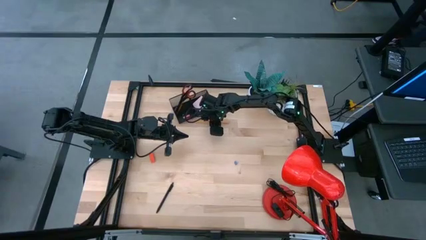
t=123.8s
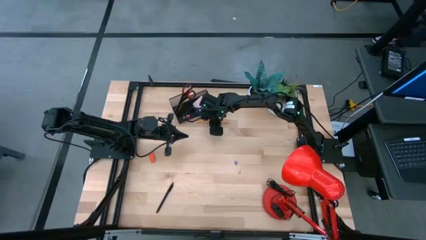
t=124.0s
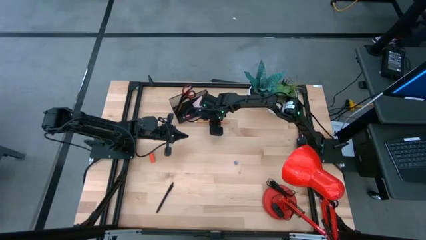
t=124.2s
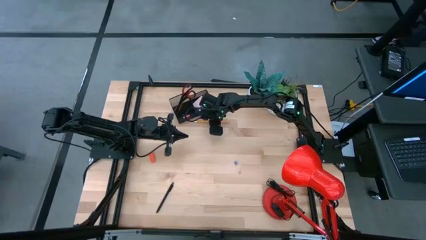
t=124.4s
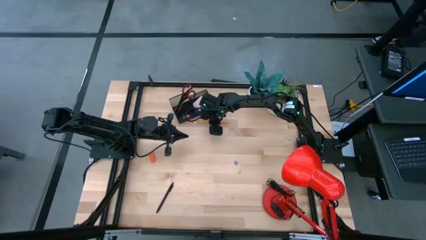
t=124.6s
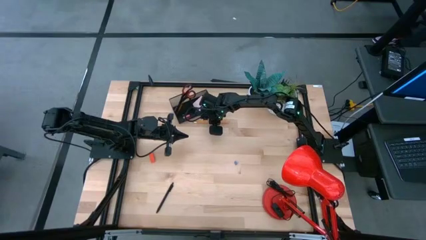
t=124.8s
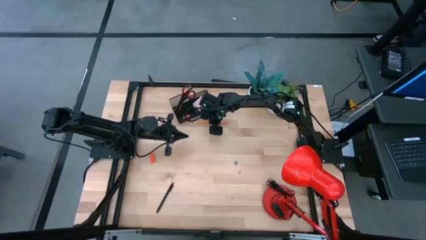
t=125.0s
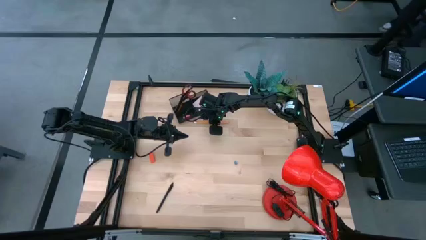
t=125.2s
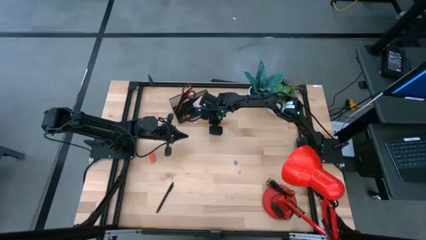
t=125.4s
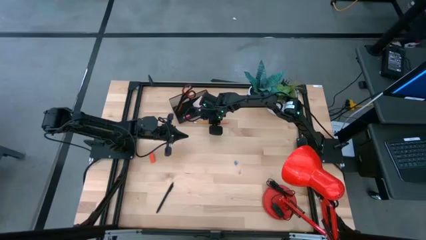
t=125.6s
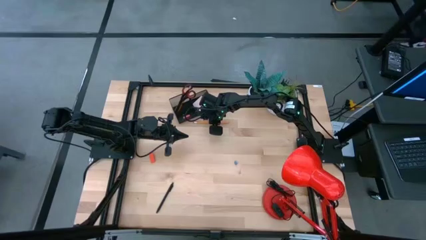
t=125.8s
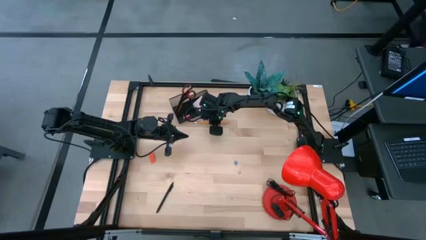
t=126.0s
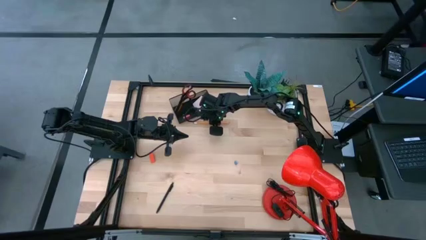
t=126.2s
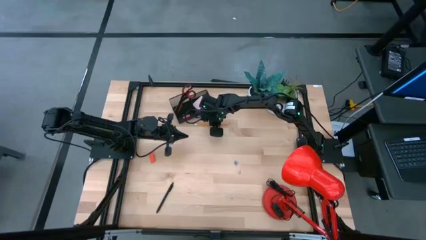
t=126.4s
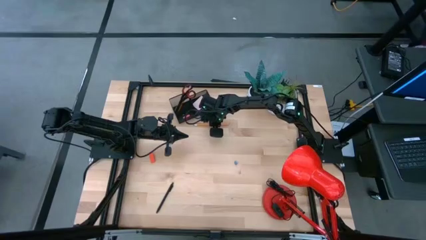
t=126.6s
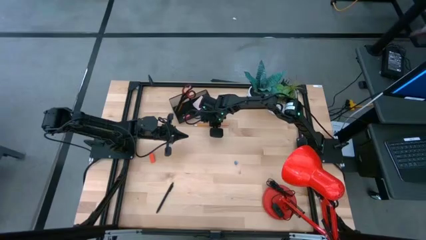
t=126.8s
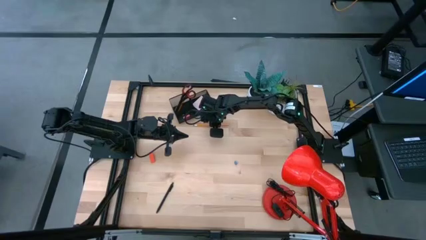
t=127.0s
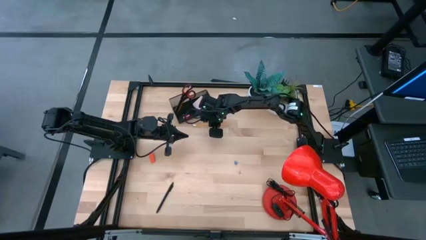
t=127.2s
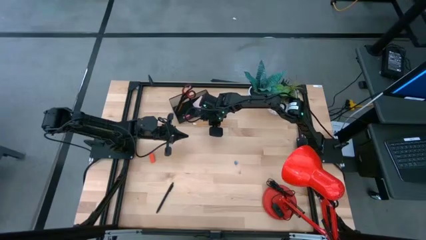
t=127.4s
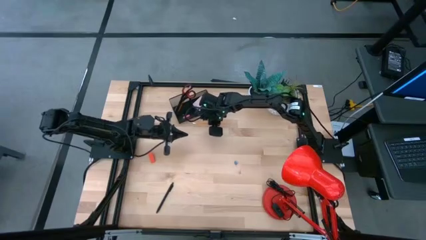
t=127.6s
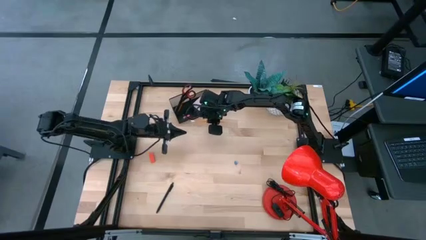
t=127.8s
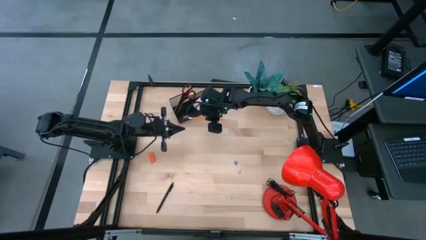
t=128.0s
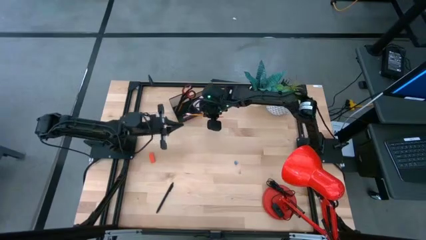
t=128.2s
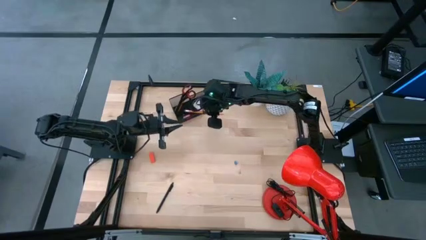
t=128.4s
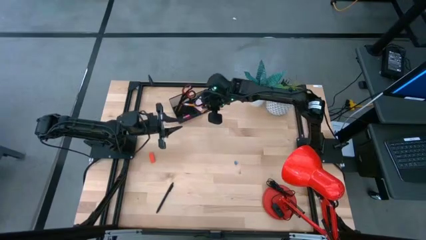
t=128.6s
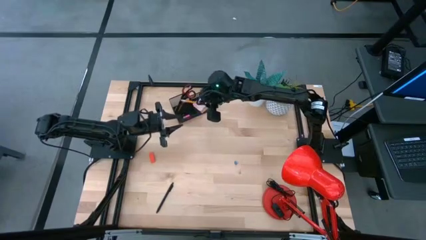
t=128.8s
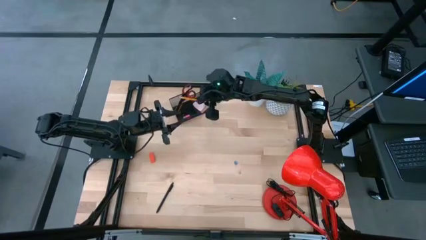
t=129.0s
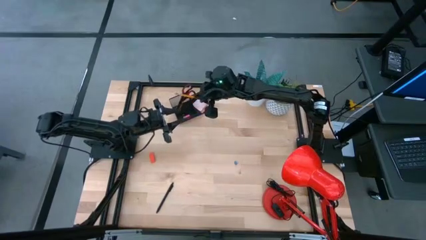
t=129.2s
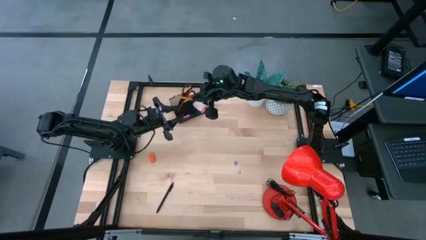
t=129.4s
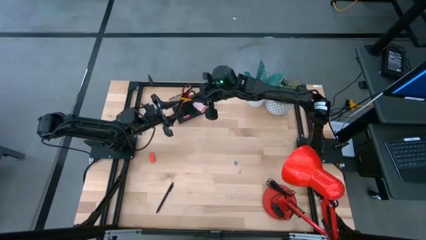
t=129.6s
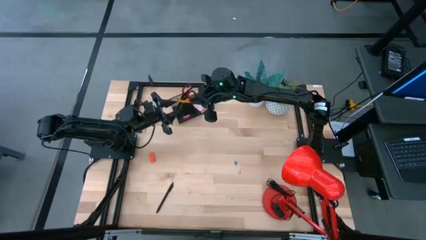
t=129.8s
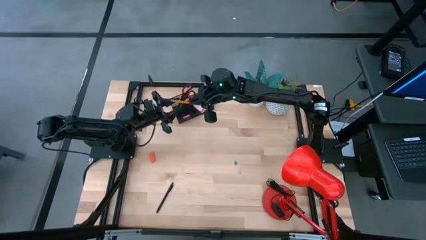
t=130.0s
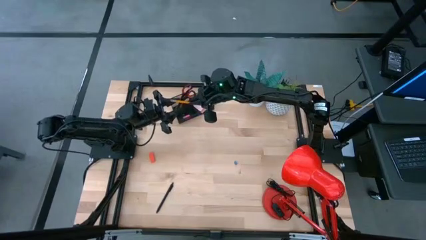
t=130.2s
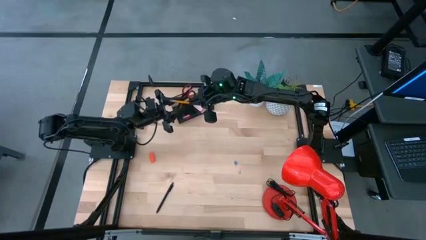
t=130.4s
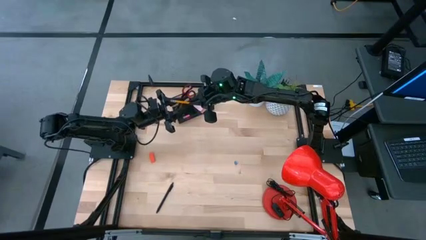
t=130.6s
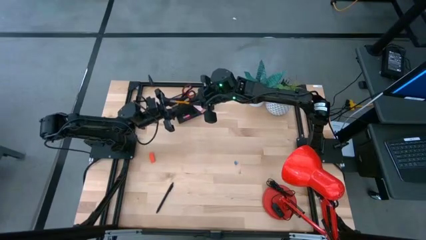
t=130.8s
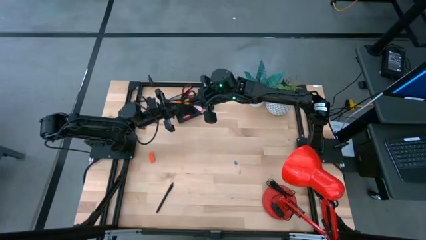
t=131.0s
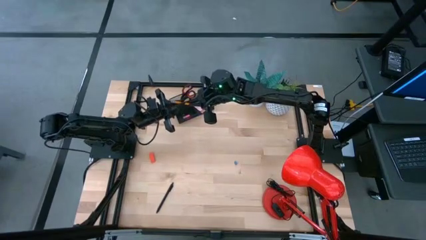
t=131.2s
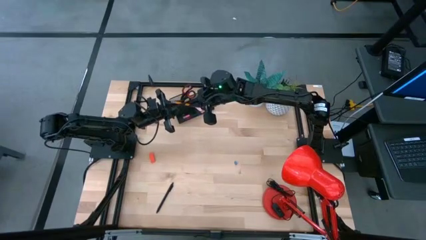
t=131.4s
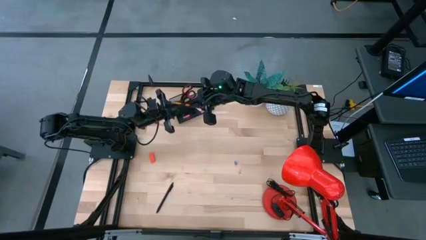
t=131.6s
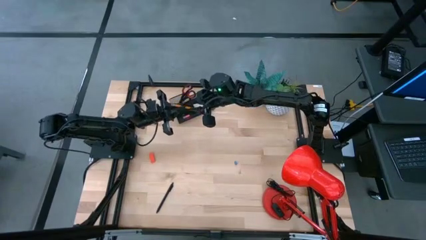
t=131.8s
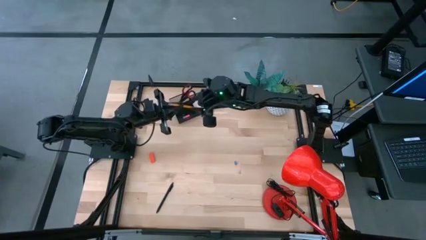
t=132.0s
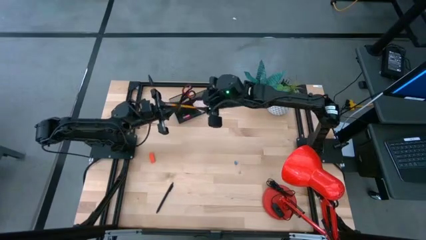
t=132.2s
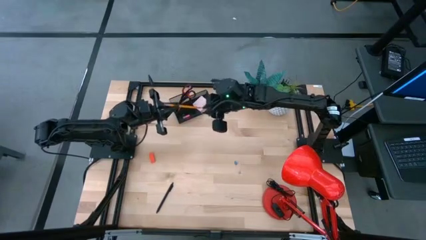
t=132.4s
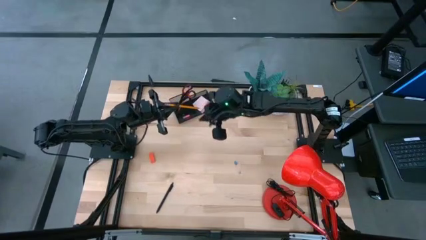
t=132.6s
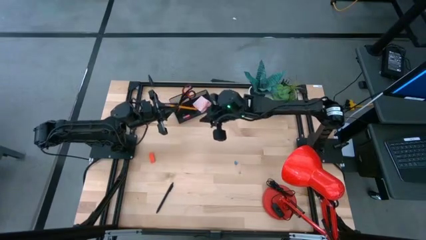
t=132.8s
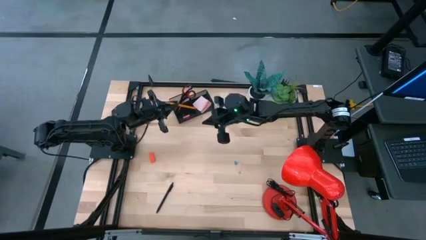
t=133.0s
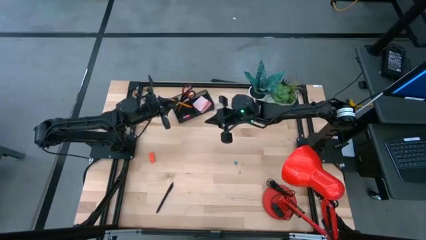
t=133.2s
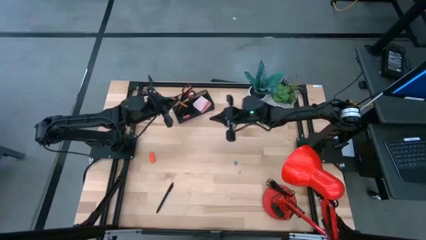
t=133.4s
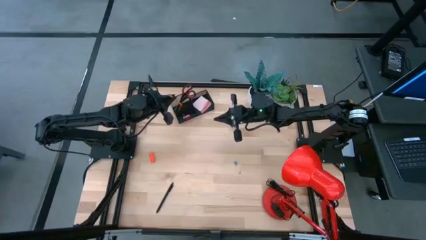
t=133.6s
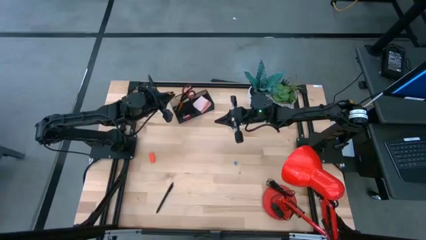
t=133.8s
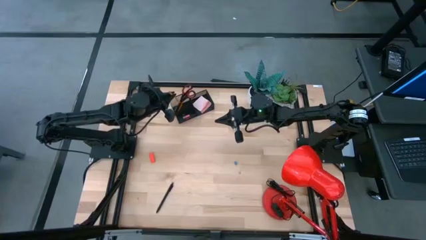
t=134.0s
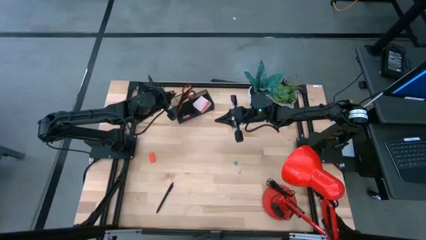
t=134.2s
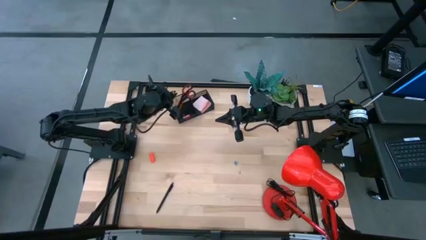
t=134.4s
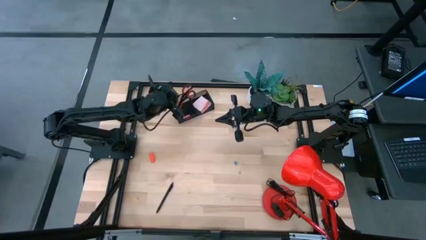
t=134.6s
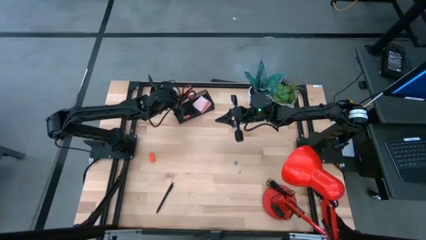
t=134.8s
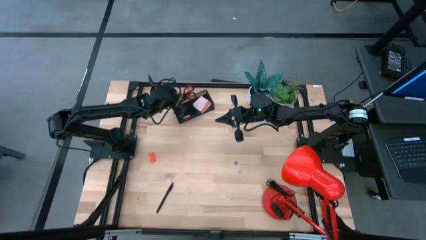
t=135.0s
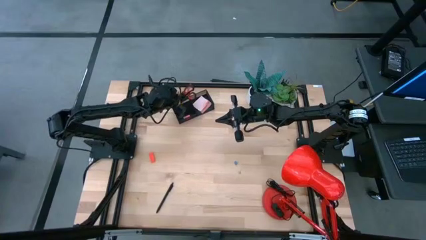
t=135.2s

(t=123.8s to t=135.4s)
Task: Pick and place office supplies into organizer
Put the pencil into the desk organizer
